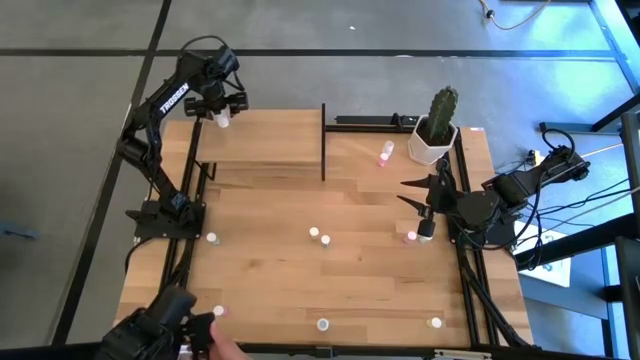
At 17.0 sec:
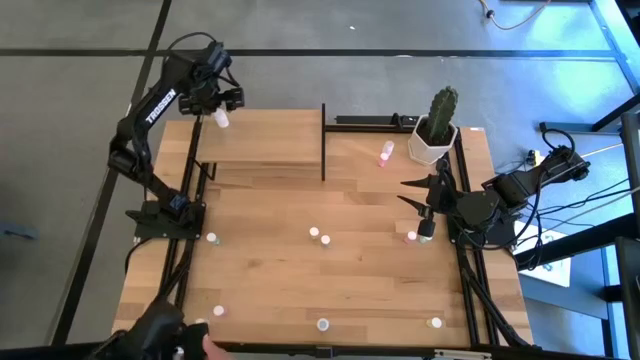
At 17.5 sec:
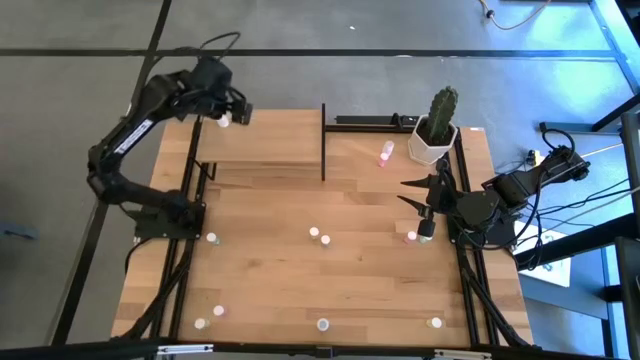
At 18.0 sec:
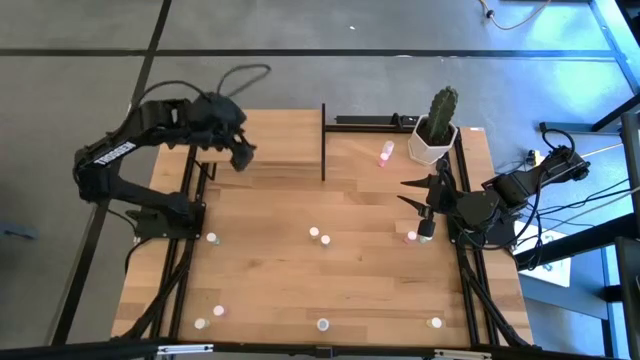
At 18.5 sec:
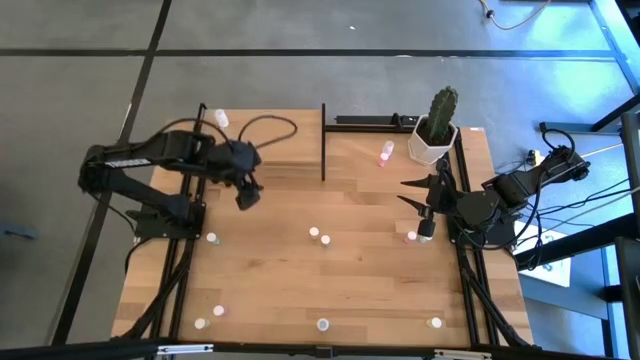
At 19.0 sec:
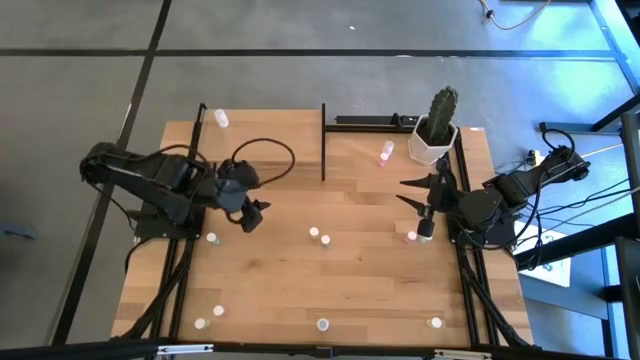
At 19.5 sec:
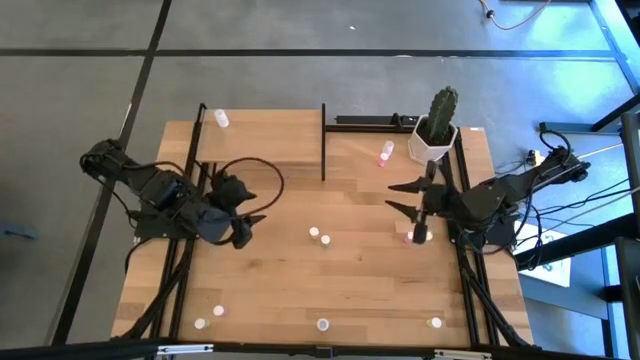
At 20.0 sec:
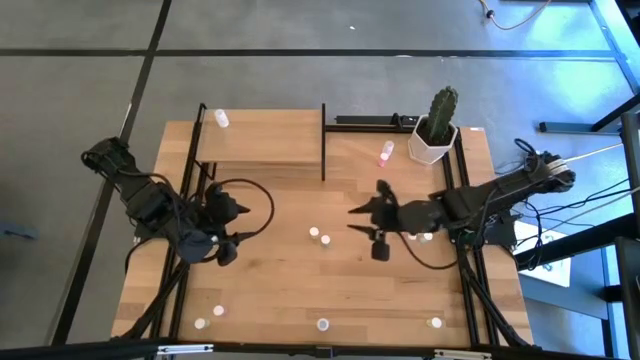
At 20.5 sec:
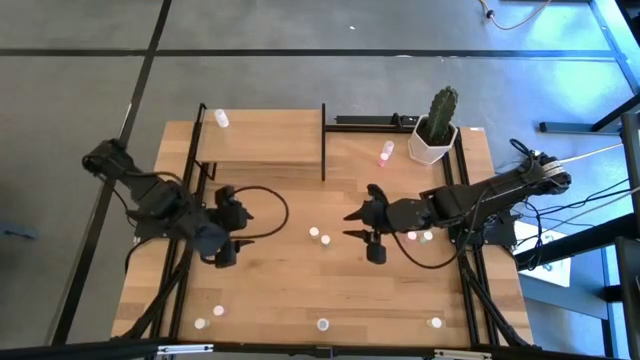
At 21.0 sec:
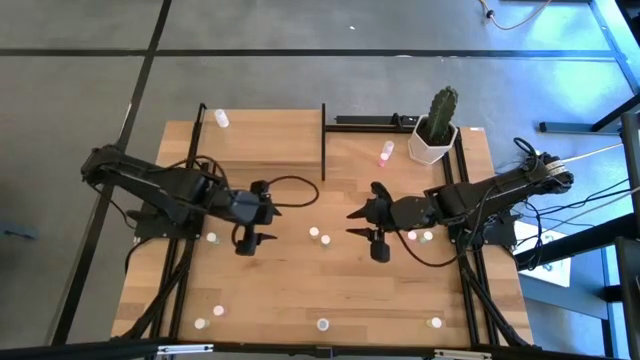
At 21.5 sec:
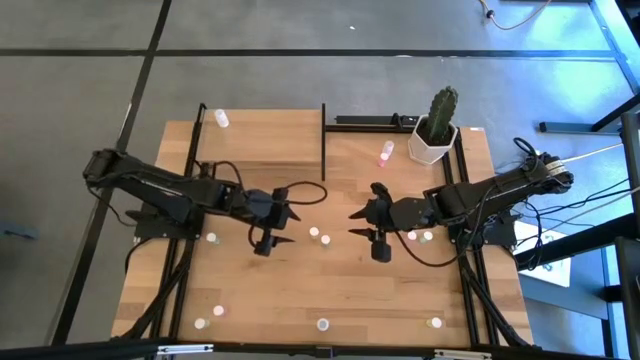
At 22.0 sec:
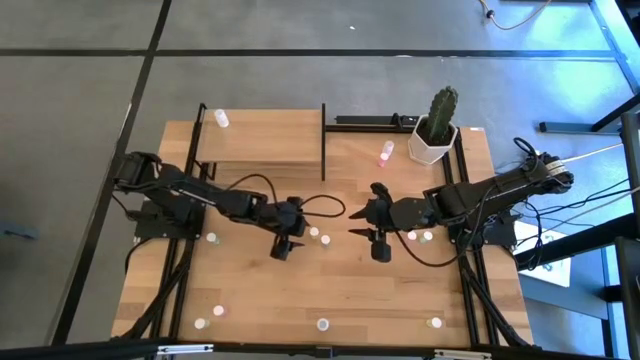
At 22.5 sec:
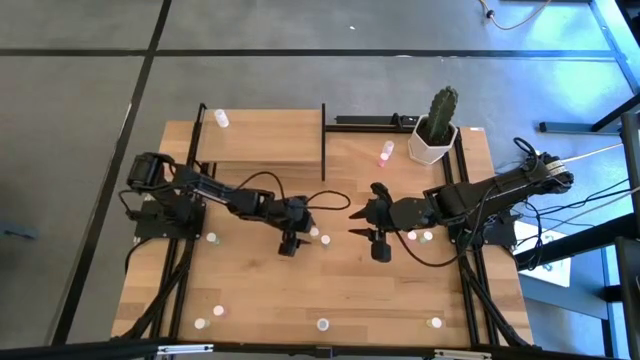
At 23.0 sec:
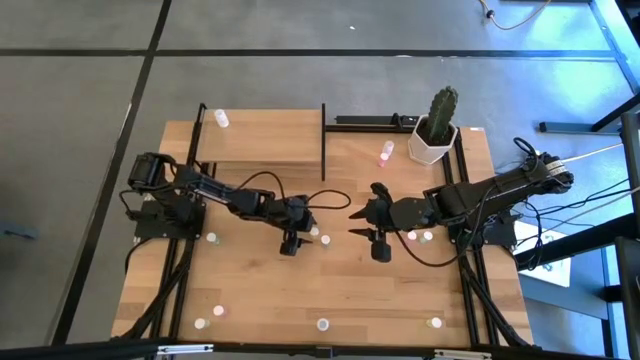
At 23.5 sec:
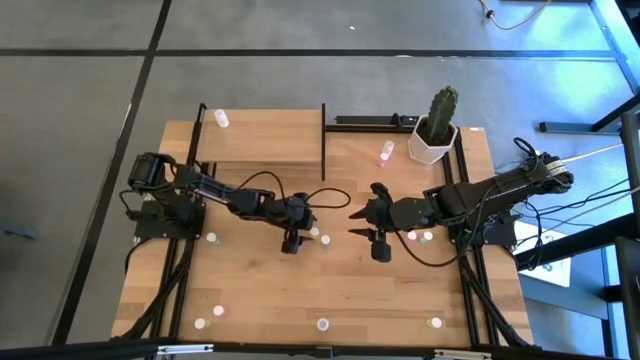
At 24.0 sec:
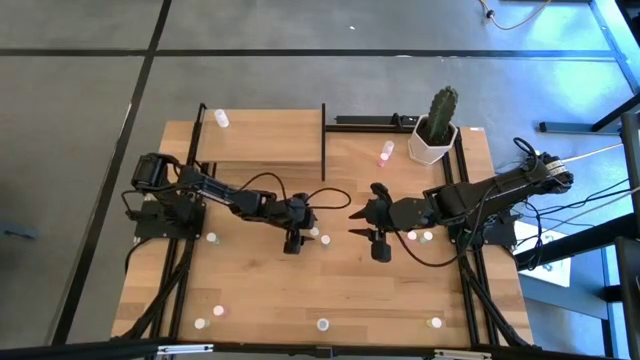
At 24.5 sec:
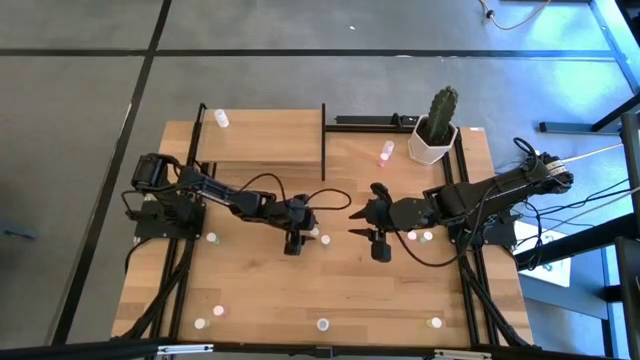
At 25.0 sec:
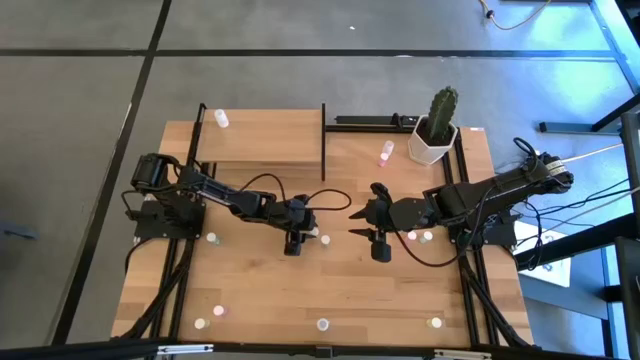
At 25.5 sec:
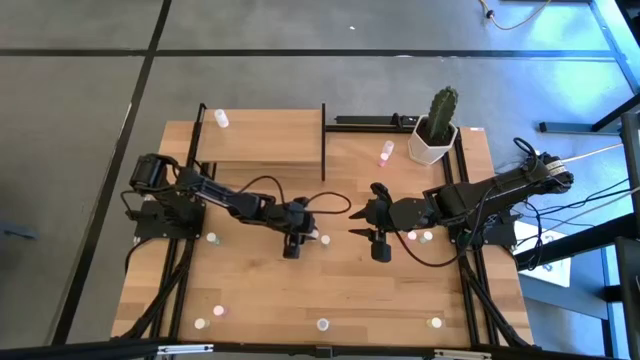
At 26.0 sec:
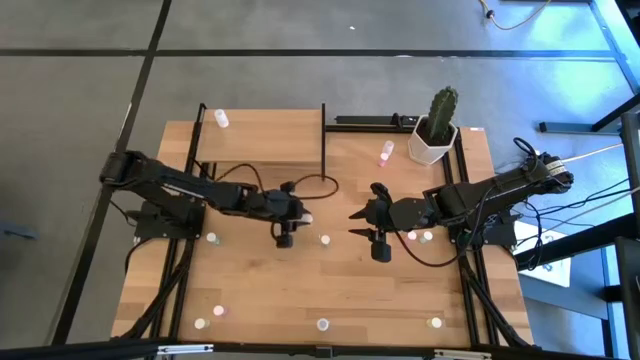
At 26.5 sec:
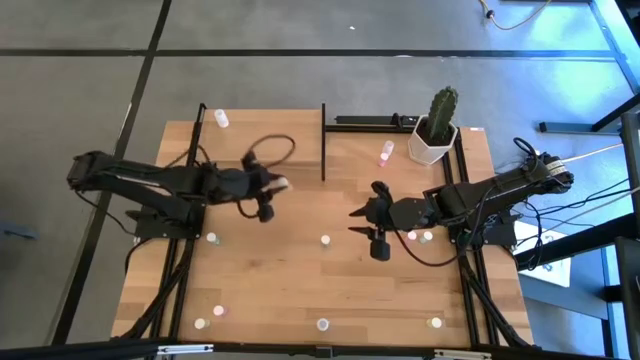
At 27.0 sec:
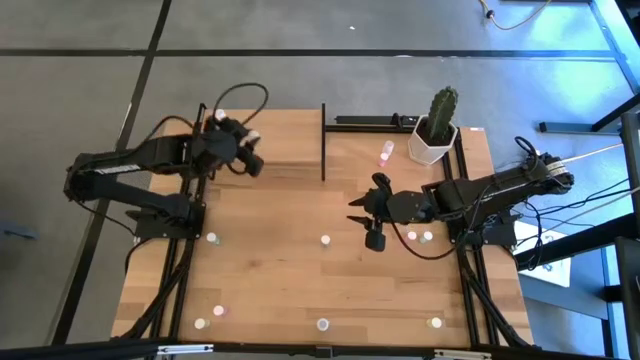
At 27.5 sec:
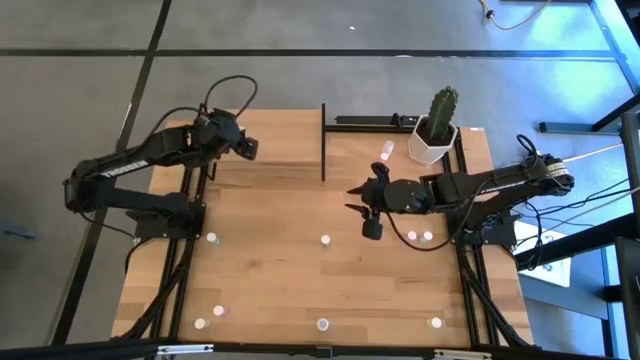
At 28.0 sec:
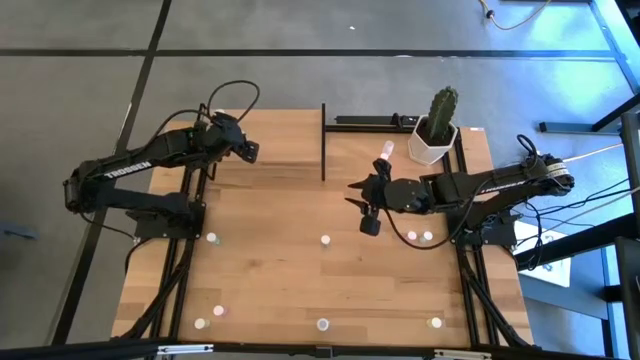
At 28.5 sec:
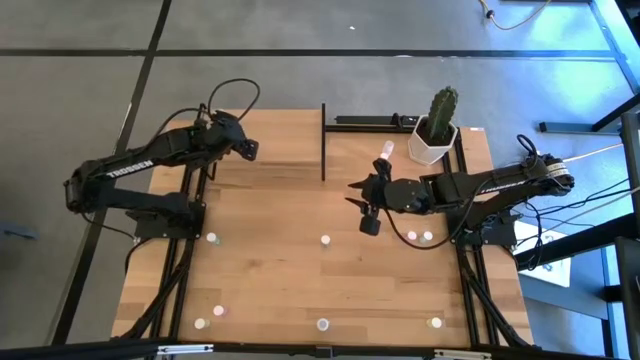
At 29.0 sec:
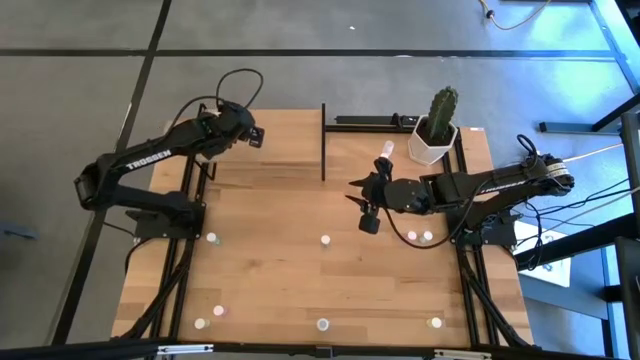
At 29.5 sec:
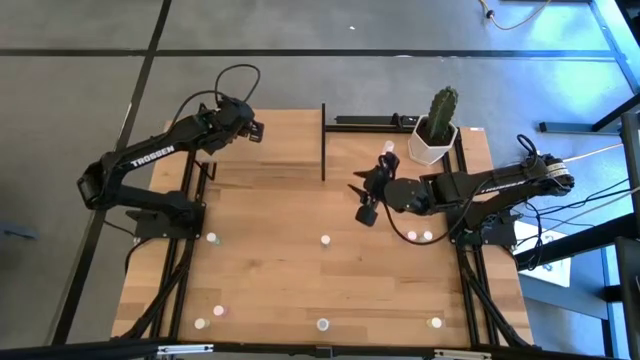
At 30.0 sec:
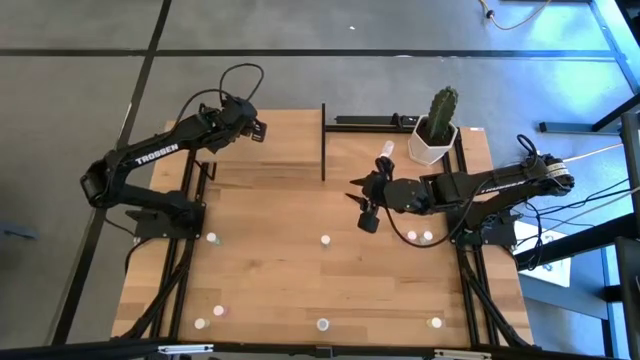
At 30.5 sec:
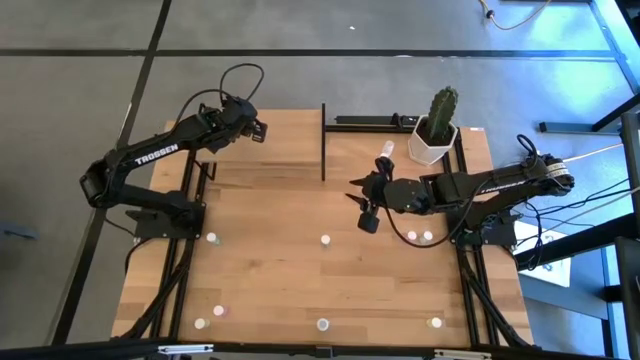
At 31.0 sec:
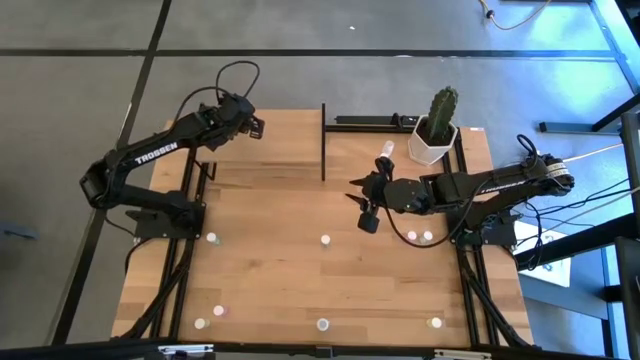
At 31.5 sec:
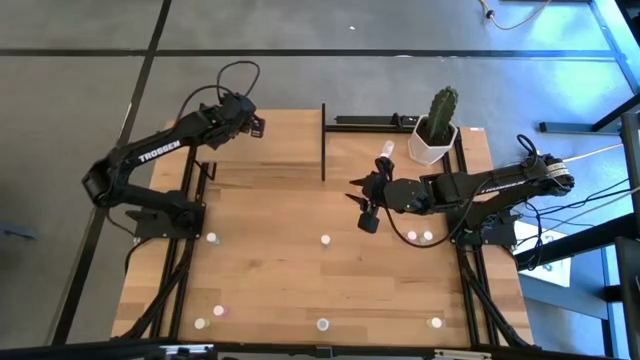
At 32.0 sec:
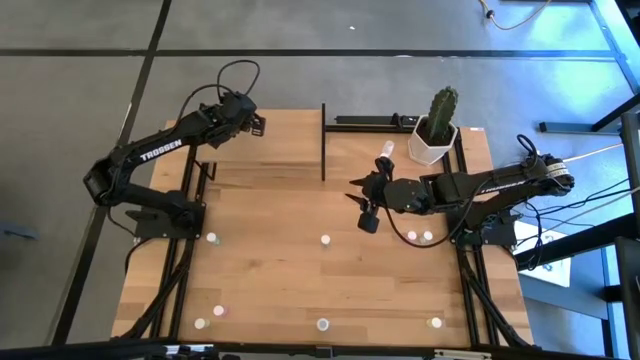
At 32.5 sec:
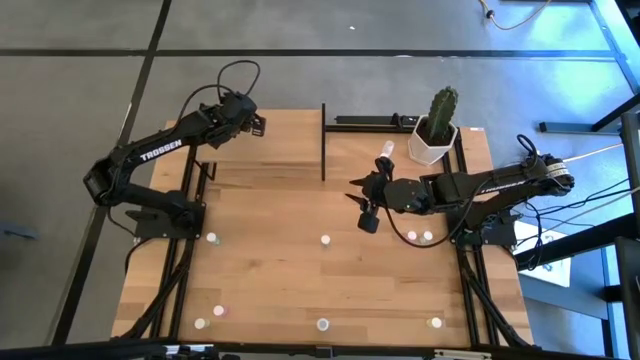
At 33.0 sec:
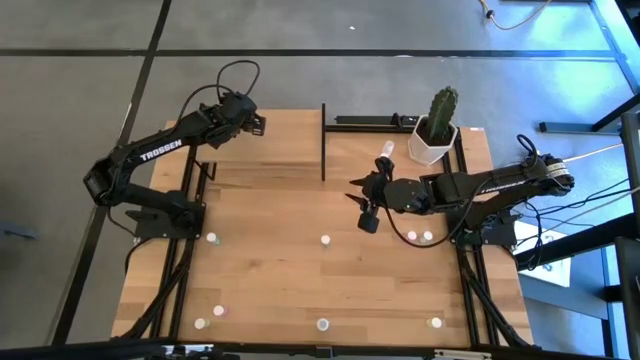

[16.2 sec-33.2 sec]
Task: Pick and place medicine bottles onto shelf by color
Put the top yellow pill bottle on the shelf

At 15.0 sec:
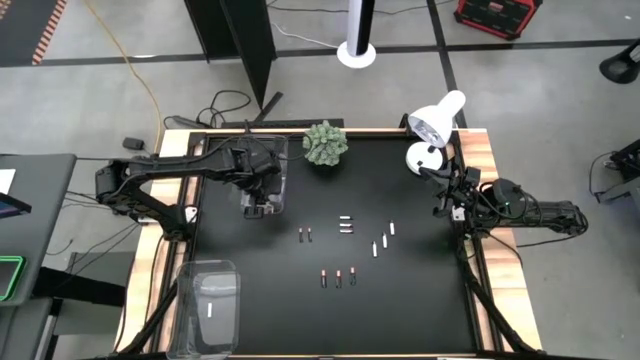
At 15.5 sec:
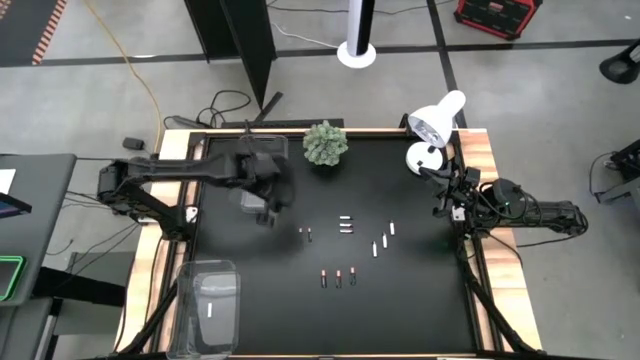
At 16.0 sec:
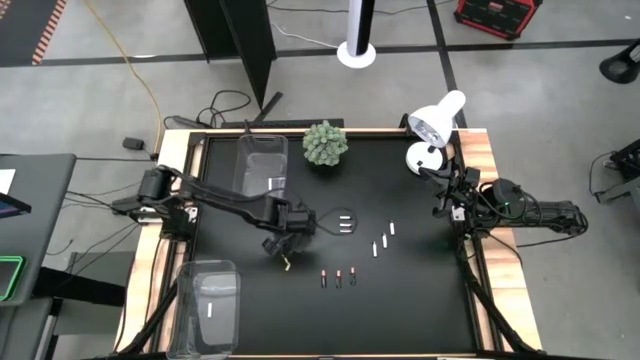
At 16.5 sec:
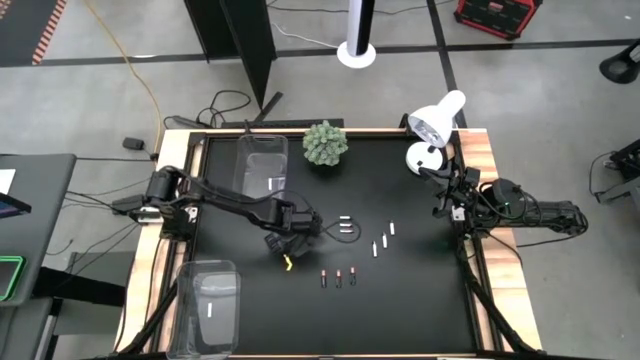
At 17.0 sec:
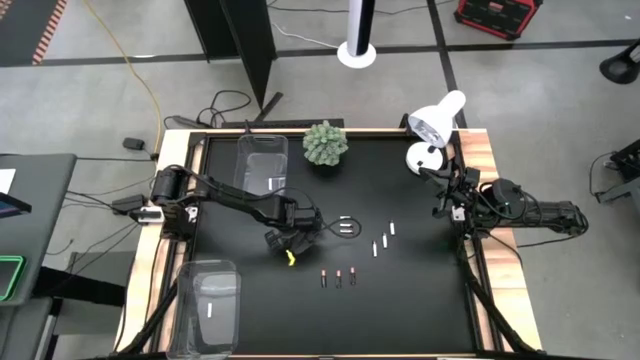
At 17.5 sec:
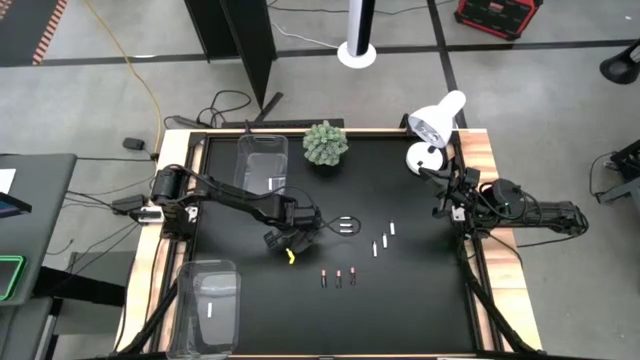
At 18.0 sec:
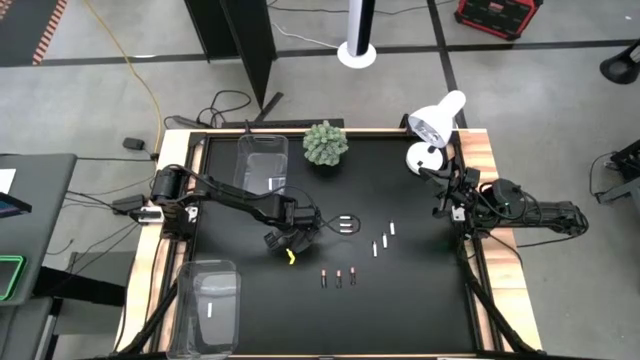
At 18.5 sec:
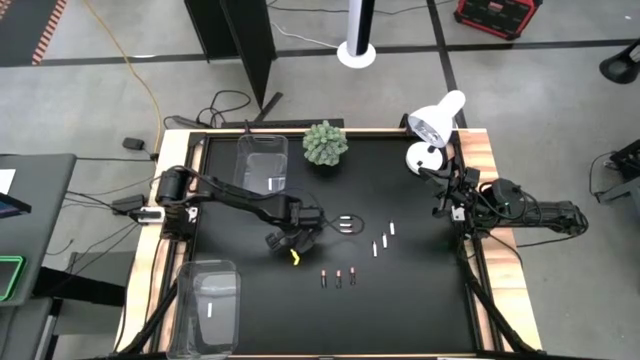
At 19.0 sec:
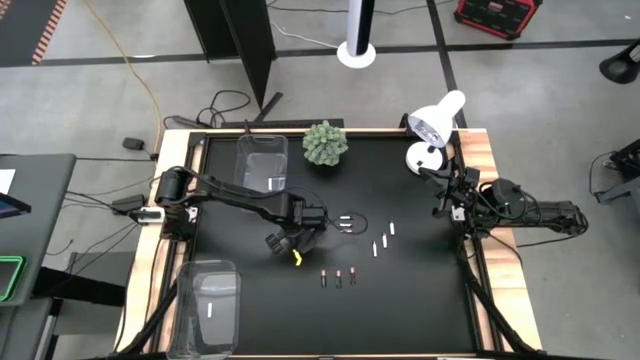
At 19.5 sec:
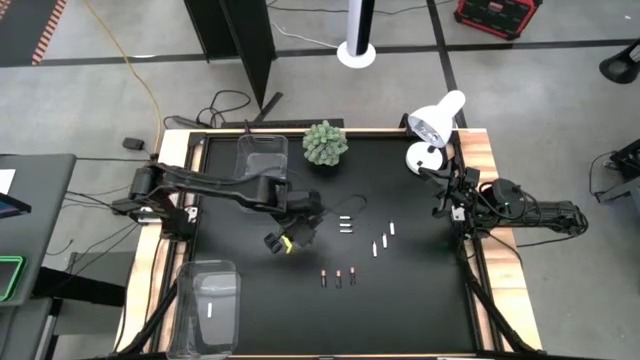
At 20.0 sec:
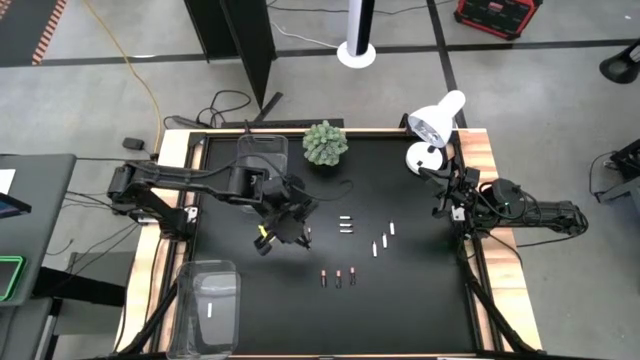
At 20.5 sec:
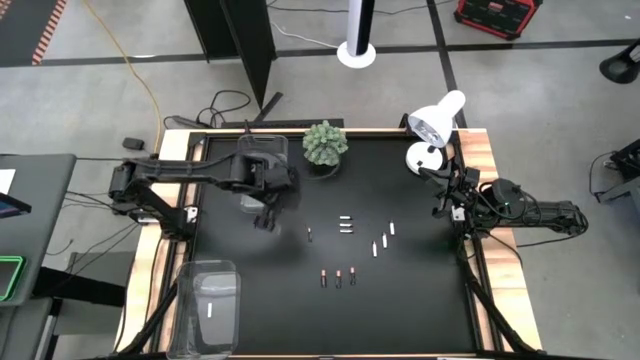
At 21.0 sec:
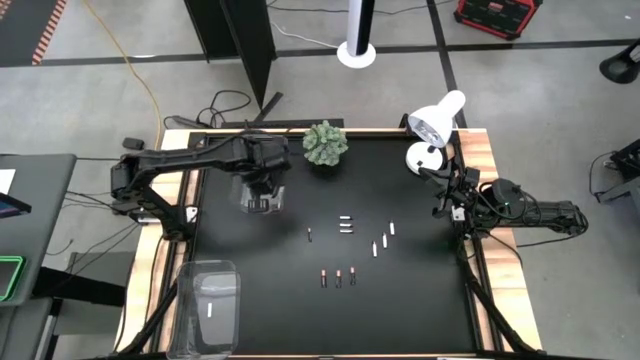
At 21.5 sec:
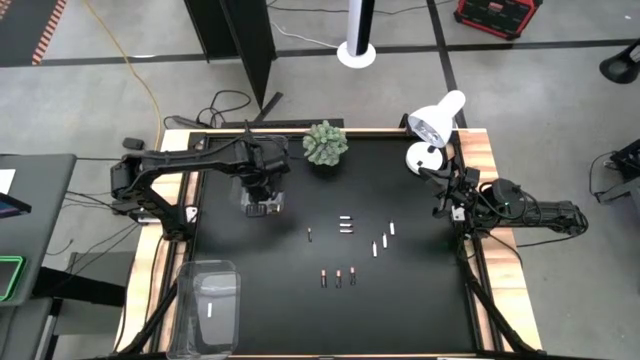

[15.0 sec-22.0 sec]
Task: Sort batteries
Put the copper and black battery into the top transparent bin
